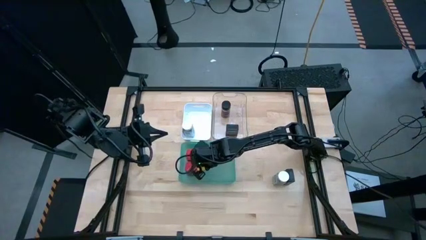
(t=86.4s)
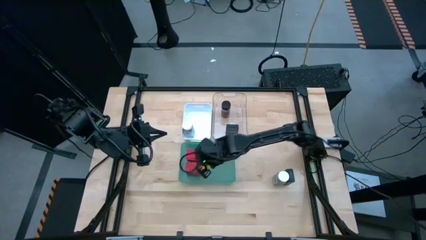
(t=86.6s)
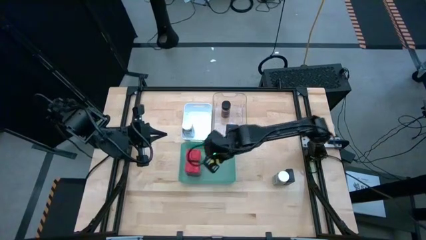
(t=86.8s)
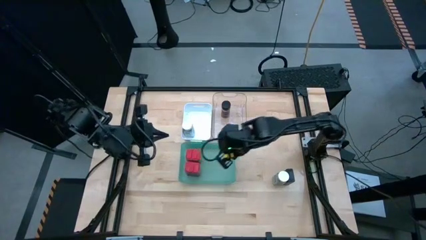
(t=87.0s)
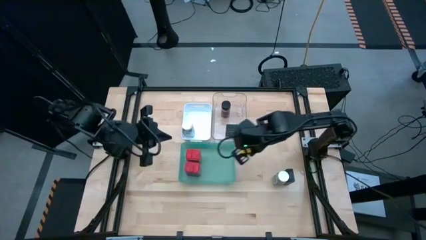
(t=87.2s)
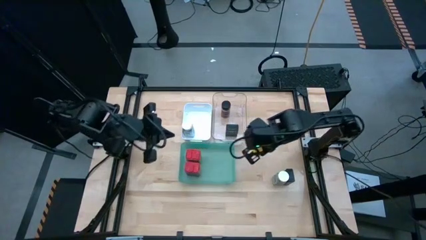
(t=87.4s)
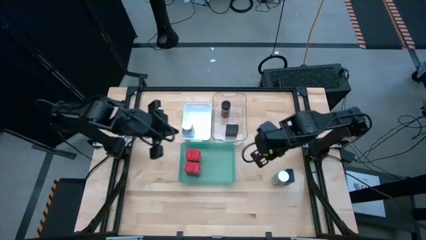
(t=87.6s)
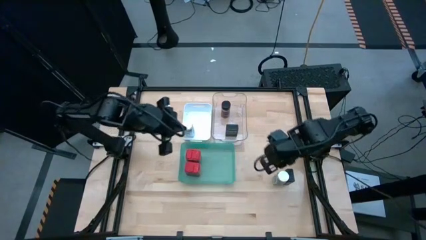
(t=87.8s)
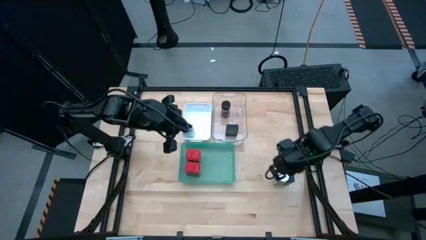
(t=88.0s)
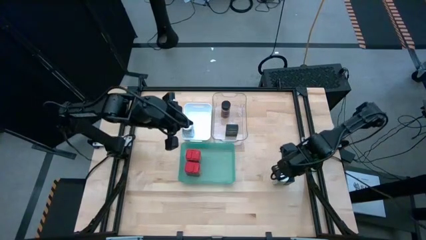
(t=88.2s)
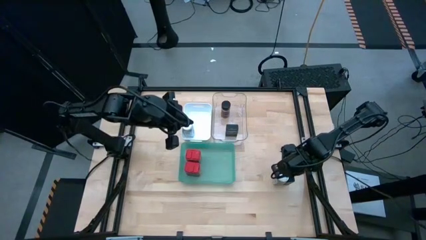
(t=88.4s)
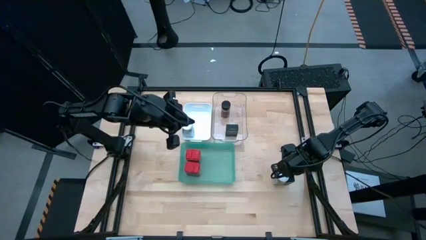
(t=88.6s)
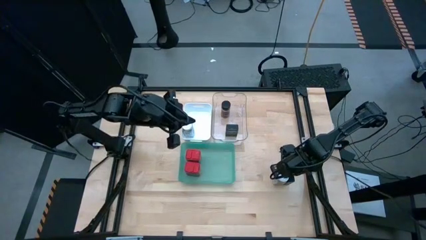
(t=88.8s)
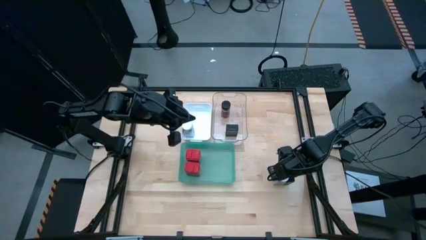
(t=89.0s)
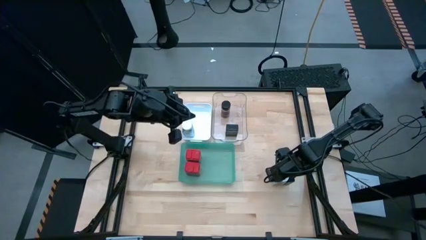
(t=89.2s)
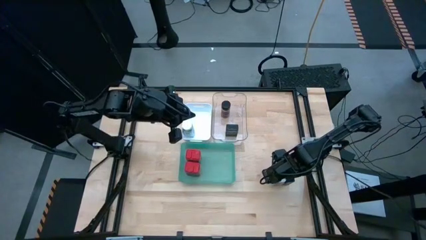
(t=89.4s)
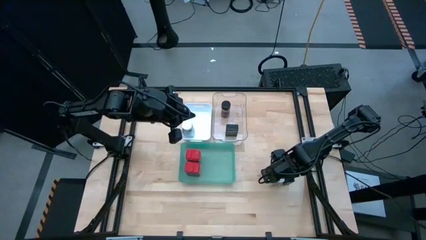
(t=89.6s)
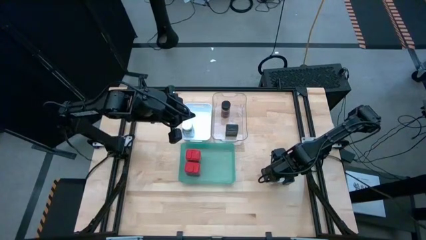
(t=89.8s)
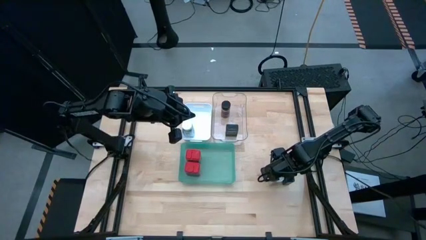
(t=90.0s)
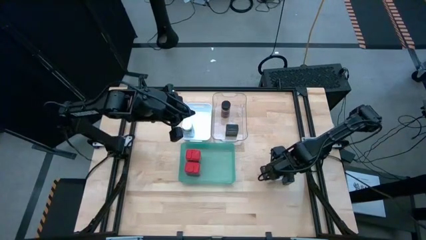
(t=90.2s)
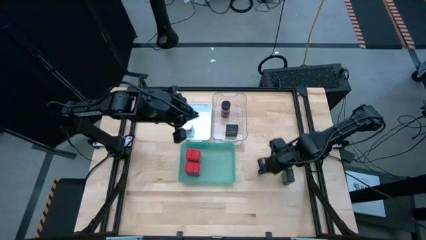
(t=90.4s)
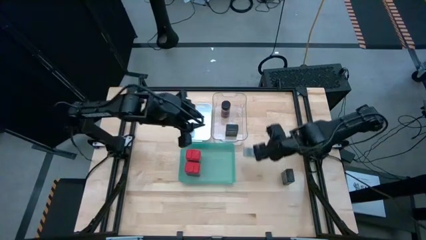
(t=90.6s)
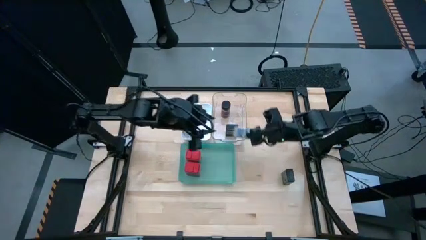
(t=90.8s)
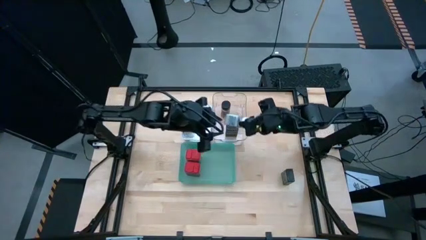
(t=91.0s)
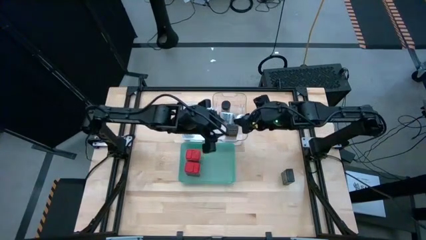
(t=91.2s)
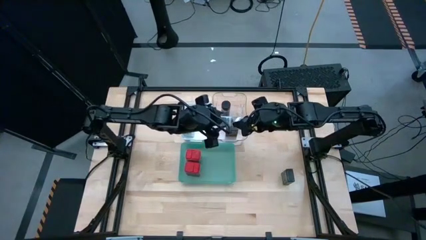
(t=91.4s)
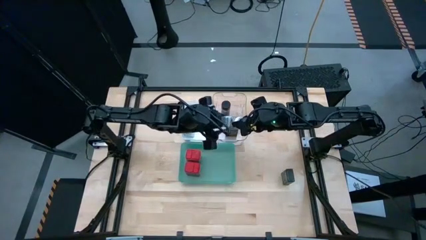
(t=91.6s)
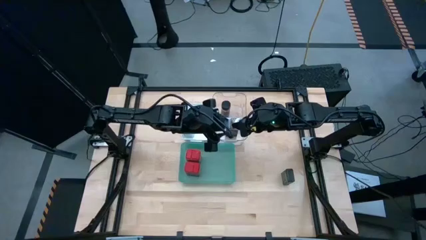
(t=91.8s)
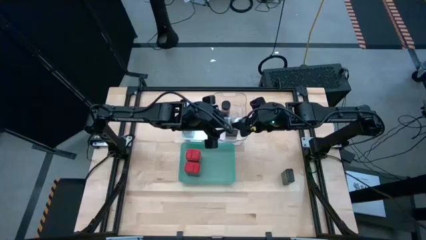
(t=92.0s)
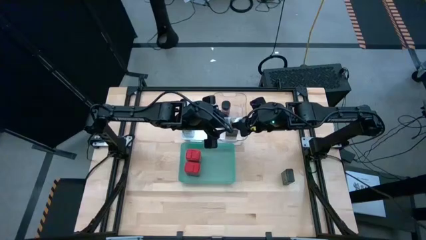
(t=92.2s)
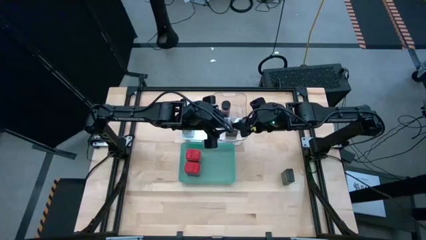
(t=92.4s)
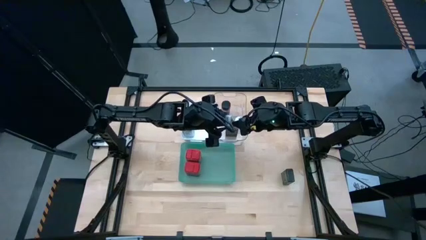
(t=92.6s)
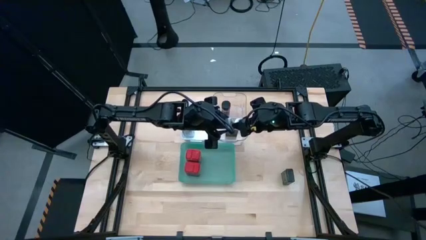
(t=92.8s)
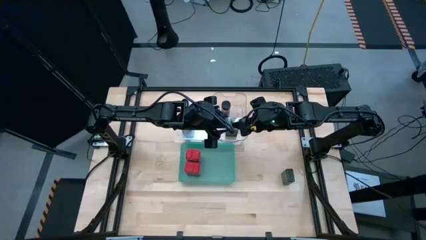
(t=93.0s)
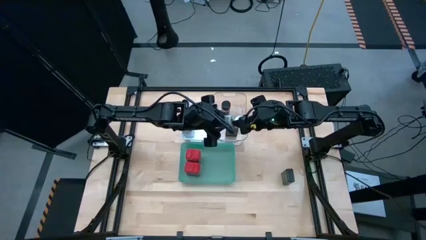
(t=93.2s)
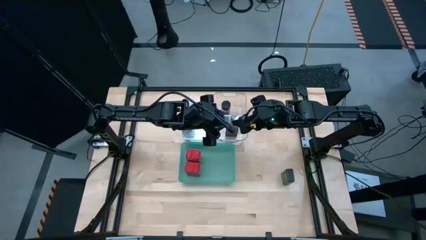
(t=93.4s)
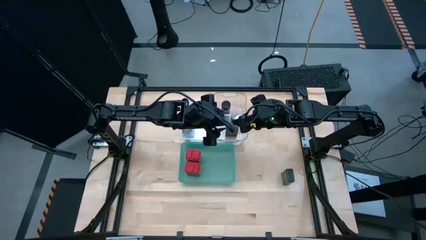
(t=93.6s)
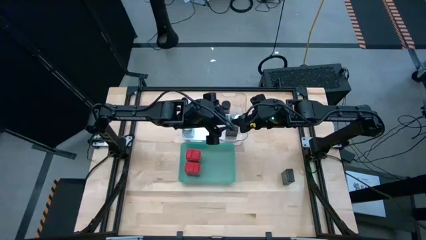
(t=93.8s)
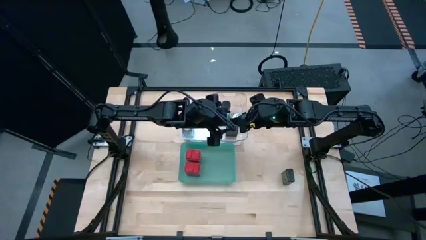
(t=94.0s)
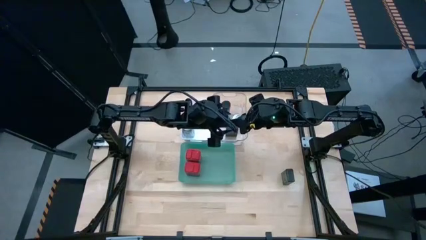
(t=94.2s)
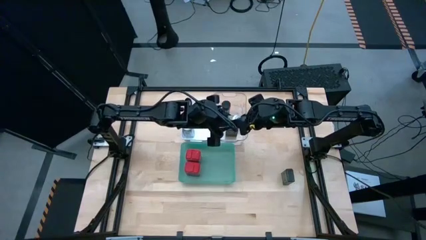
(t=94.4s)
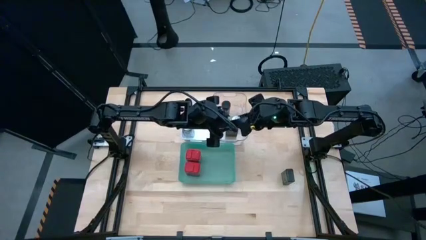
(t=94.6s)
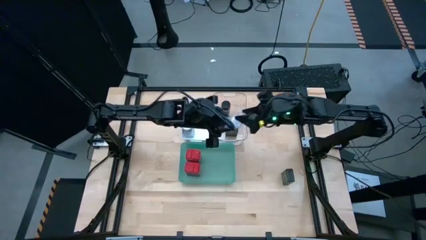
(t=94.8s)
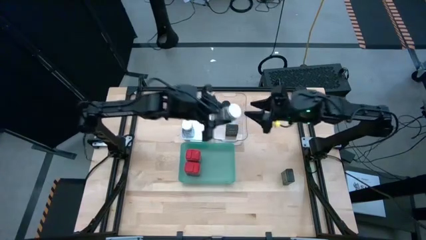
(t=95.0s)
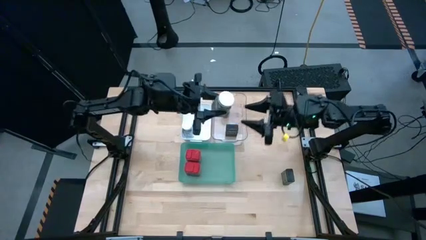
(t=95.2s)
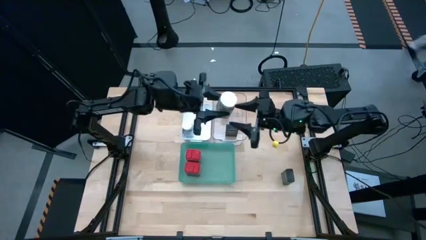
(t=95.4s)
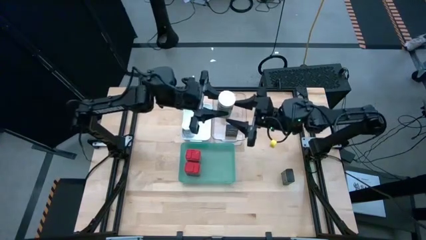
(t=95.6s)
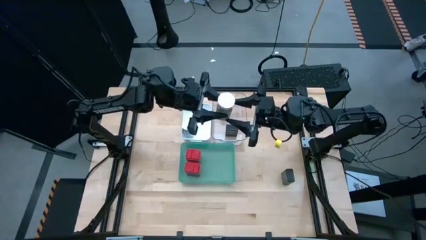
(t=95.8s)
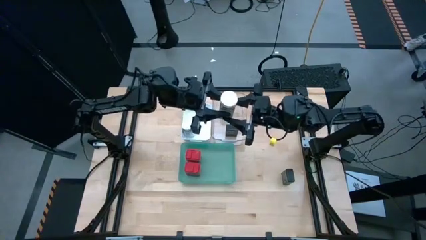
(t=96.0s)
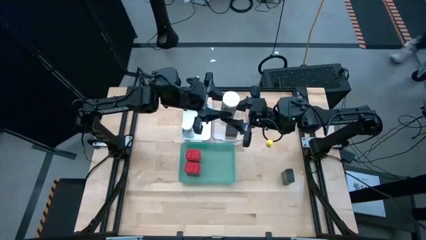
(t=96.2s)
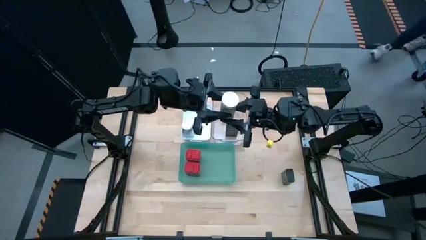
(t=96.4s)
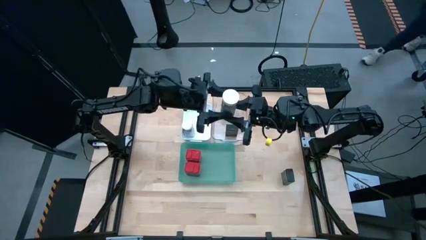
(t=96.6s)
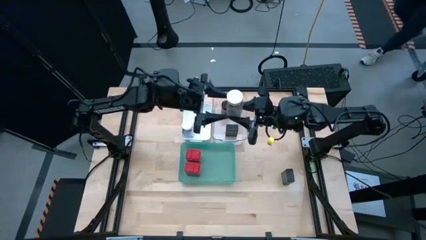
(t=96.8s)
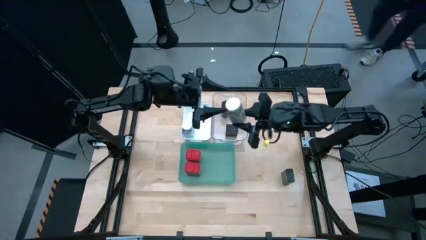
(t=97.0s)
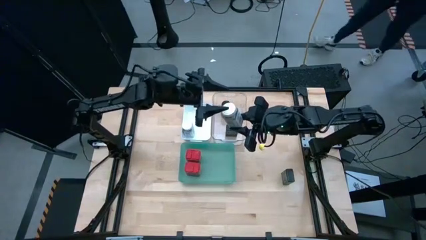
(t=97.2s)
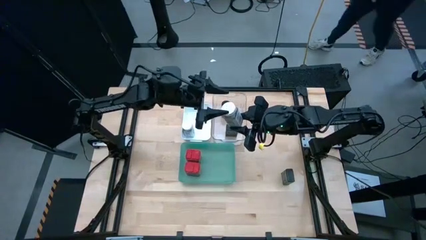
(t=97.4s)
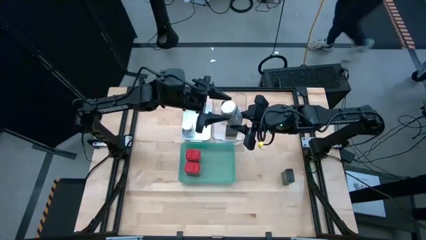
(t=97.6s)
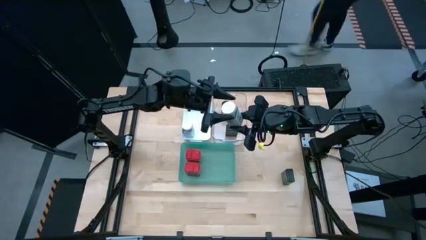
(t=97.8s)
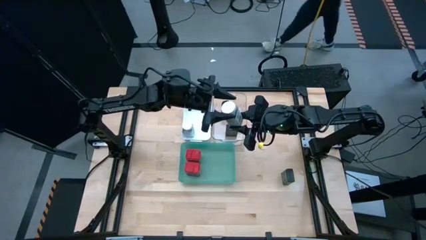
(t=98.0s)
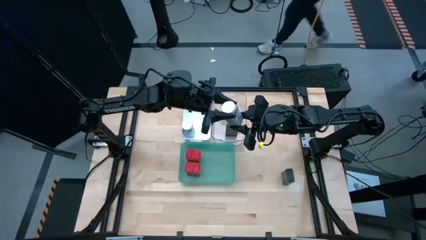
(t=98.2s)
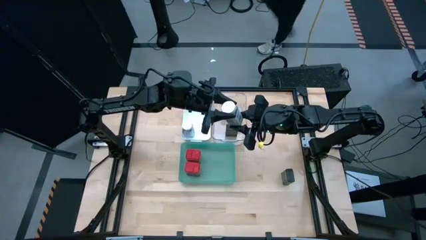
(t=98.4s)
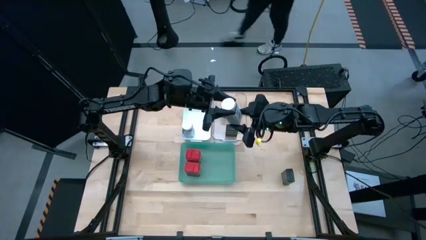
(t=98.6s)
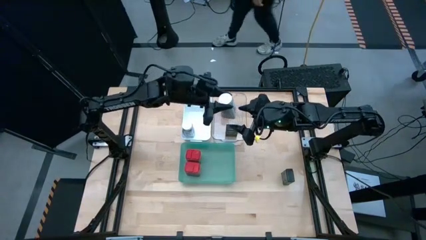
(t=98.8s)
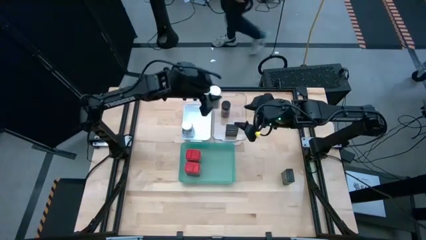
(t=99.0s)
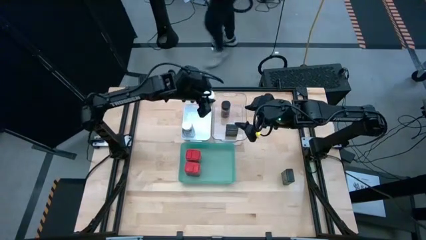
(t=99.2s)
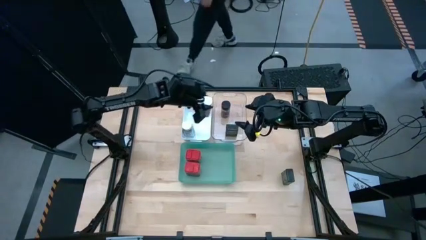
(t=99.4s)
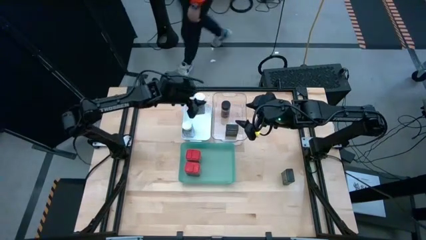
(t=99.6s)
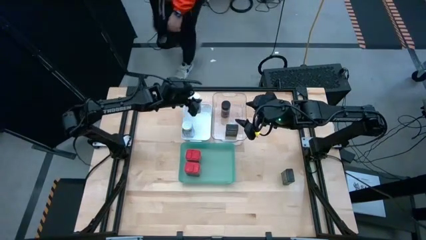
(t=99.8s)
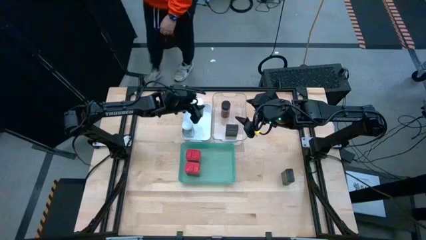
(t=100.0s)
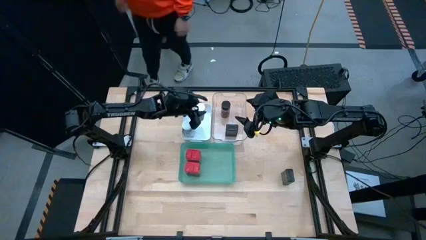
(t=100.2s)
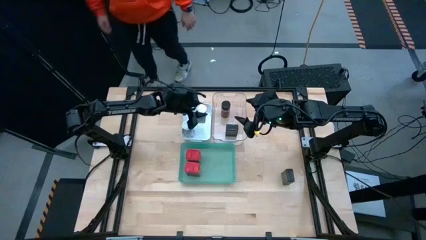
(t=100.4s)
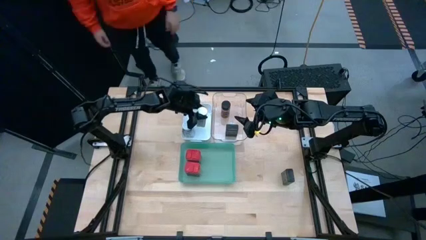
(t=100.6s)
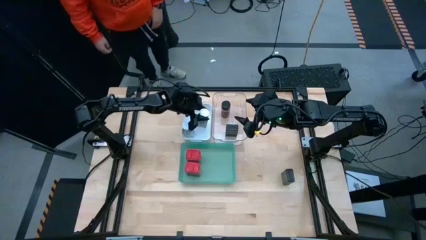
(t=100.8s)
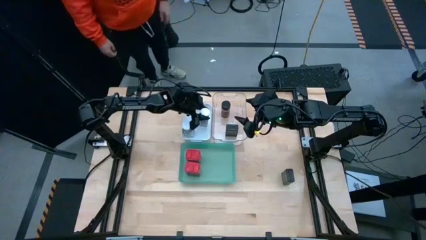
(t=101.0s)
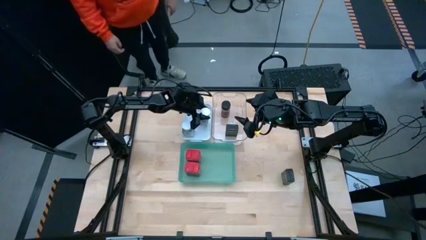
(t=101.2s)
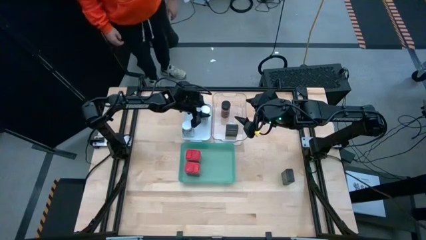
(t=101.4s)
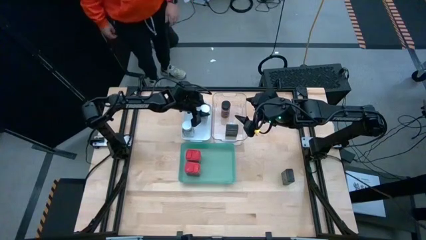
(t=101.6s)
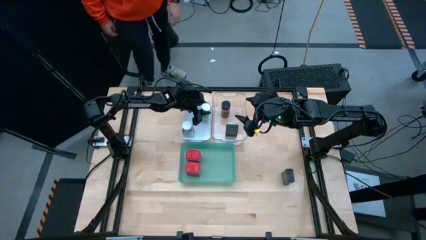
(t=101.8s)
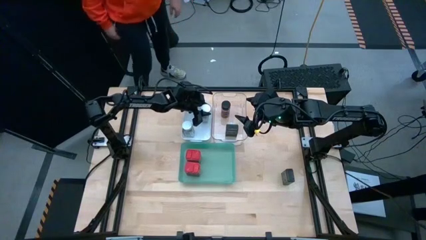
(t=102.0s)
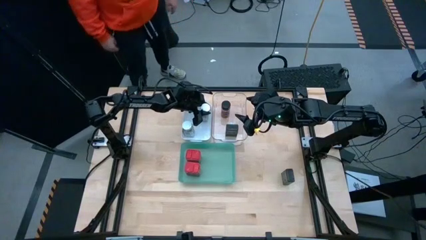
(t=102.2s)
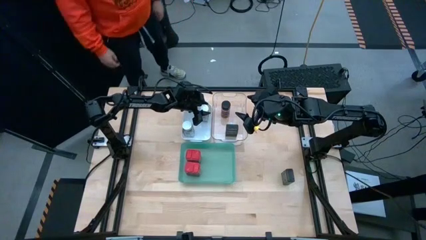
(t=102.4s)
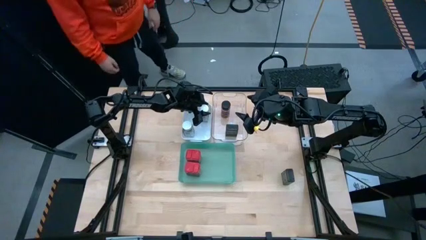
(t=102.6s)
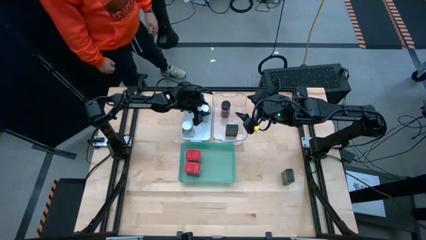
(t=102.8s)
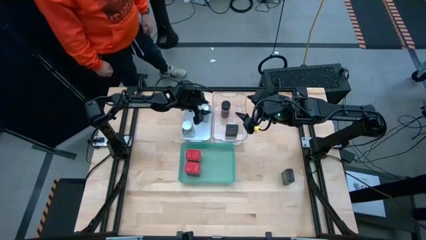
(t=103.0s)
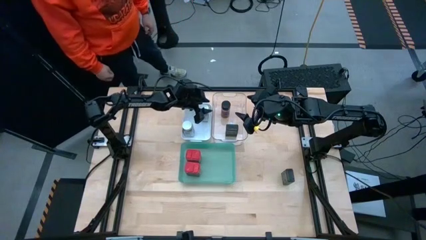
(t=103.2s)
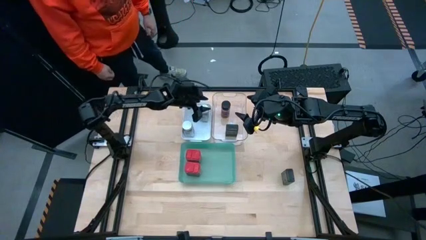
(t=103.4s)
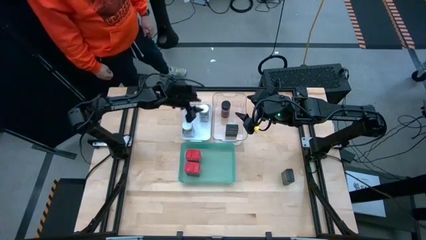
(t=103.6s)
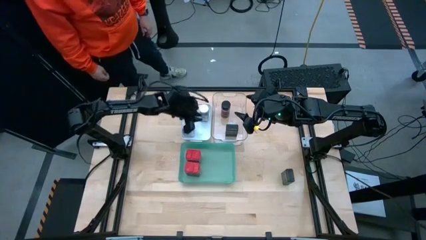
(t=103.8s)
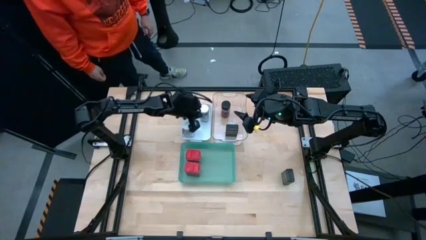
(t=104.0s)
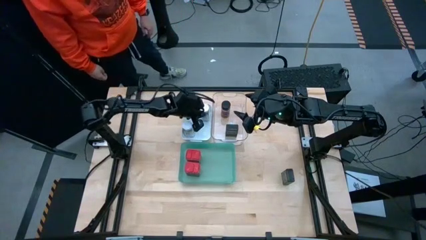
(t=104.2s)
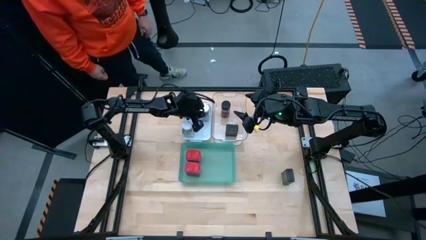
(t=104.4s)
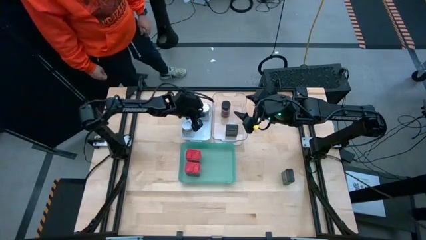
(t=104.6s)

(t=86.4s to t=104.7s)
Task: Sort spices by type
Put the white spice bottle into the white bin
